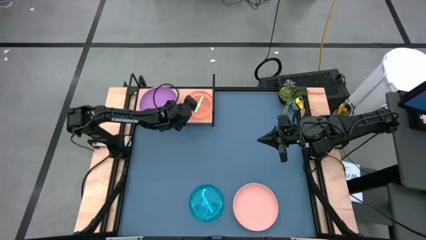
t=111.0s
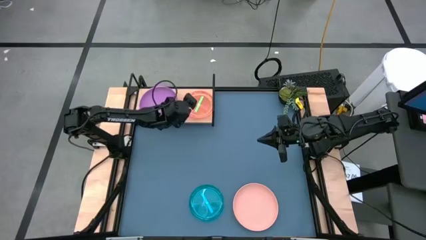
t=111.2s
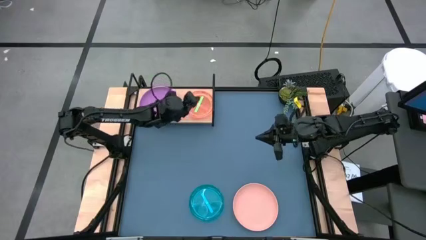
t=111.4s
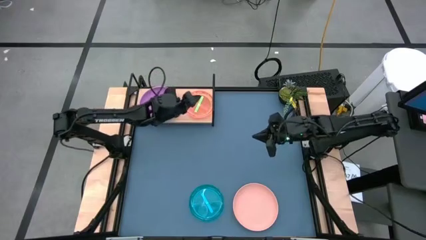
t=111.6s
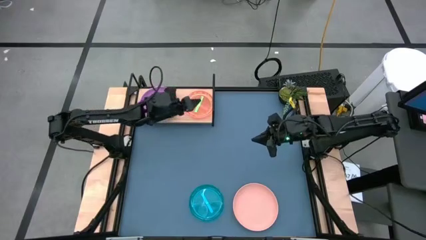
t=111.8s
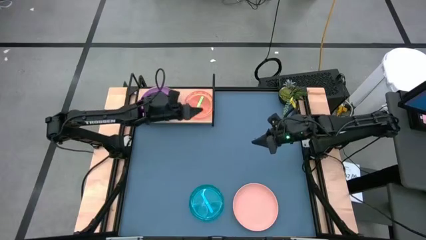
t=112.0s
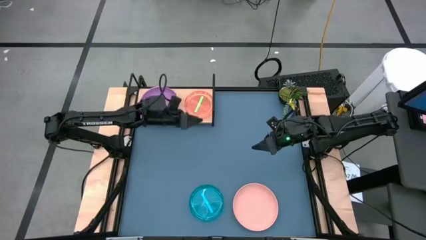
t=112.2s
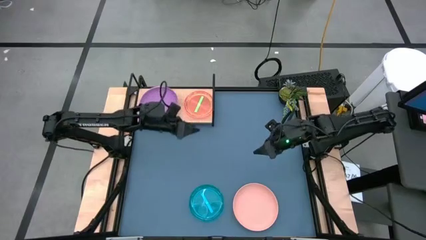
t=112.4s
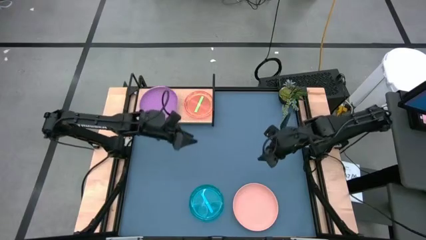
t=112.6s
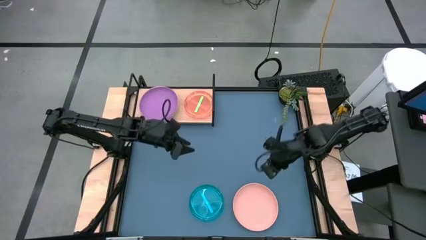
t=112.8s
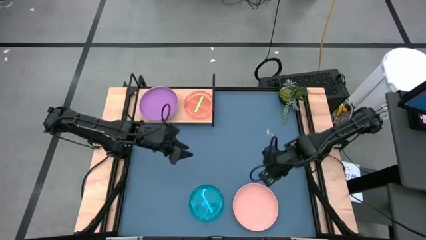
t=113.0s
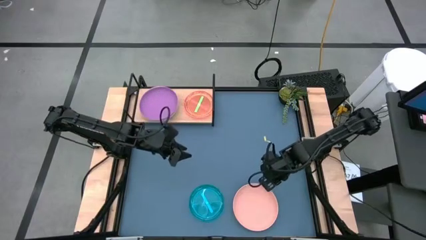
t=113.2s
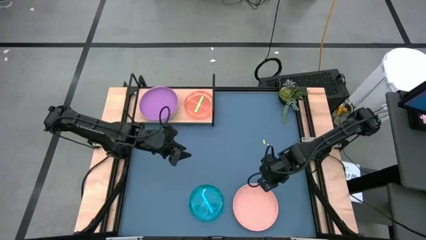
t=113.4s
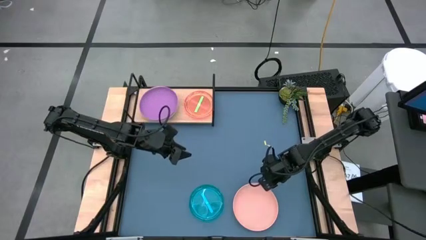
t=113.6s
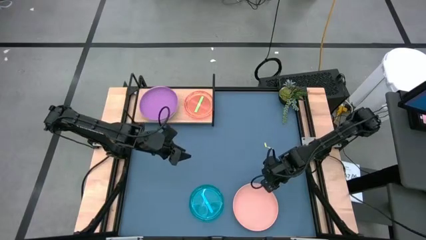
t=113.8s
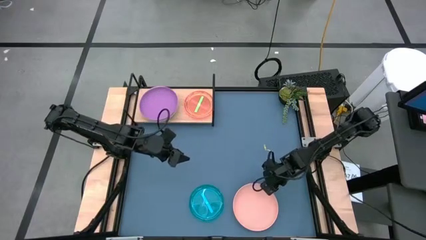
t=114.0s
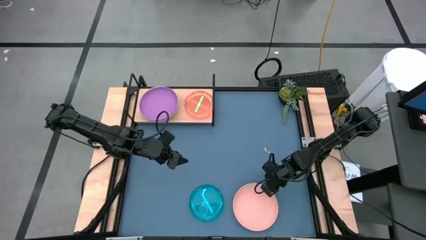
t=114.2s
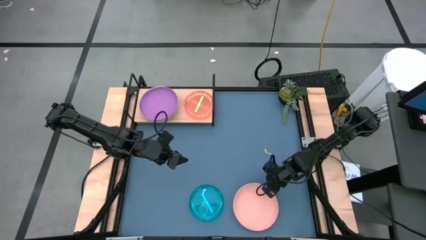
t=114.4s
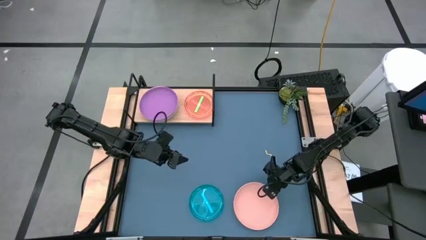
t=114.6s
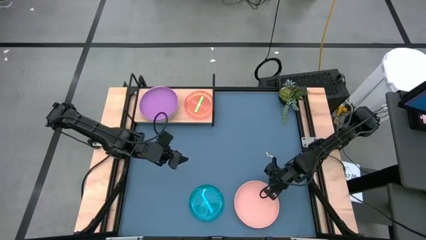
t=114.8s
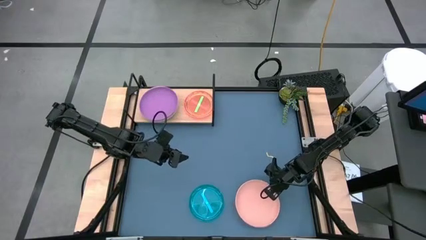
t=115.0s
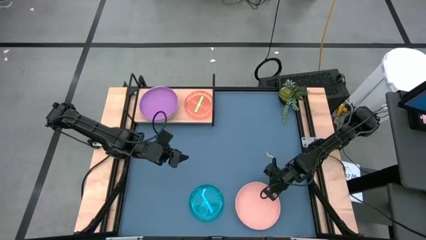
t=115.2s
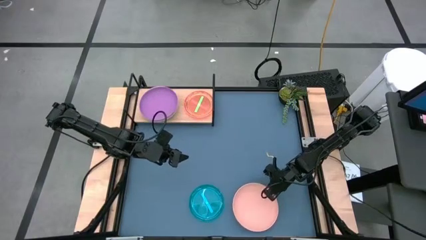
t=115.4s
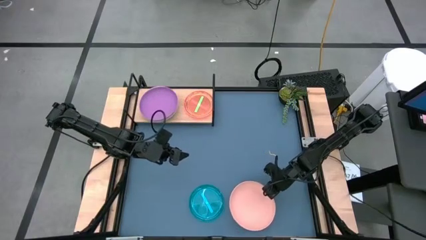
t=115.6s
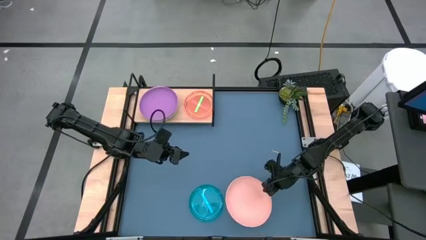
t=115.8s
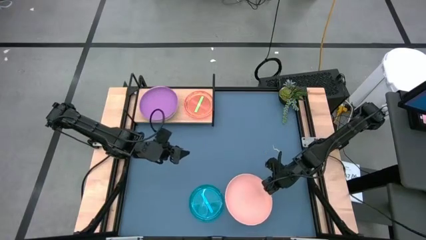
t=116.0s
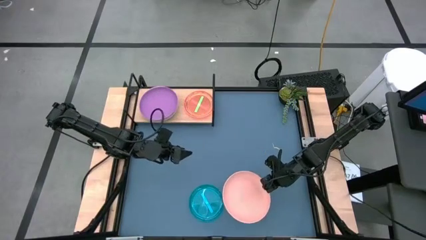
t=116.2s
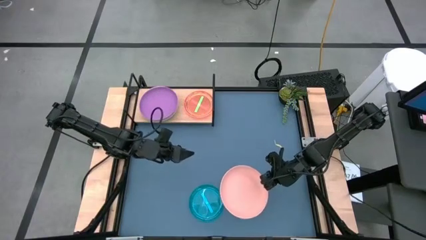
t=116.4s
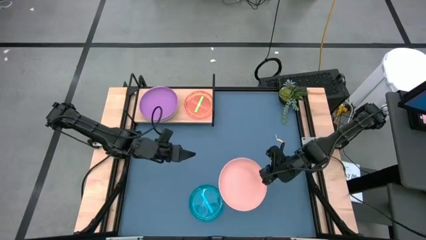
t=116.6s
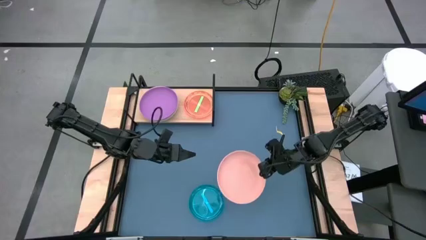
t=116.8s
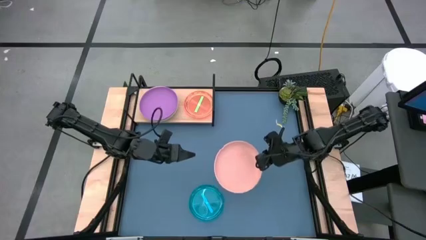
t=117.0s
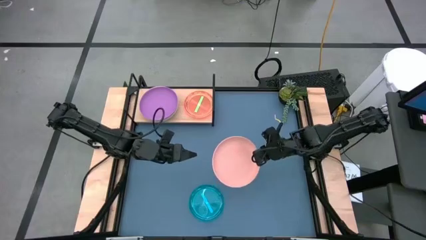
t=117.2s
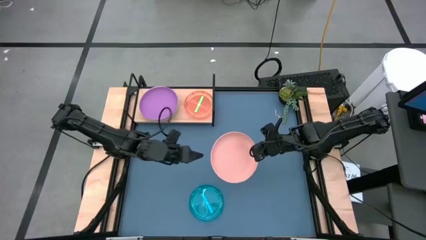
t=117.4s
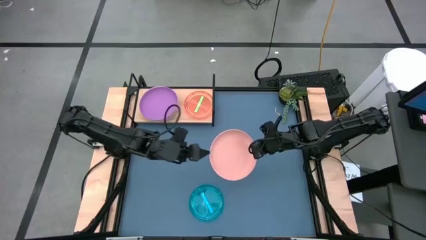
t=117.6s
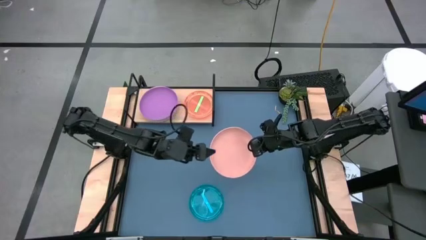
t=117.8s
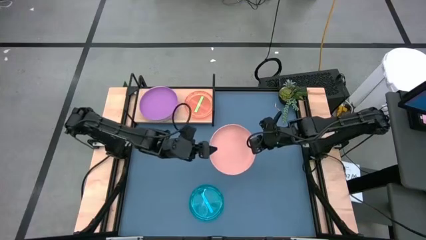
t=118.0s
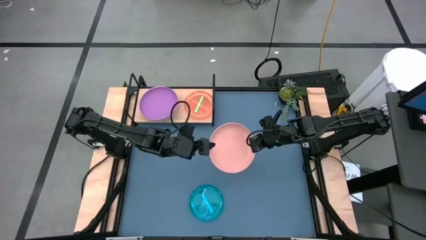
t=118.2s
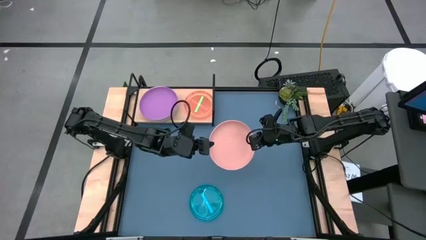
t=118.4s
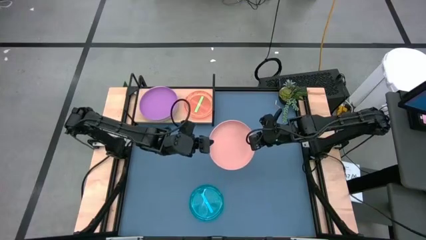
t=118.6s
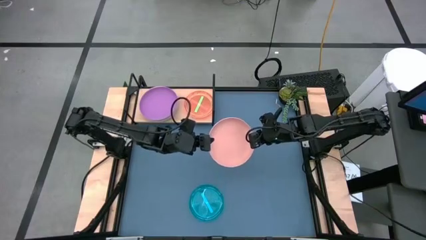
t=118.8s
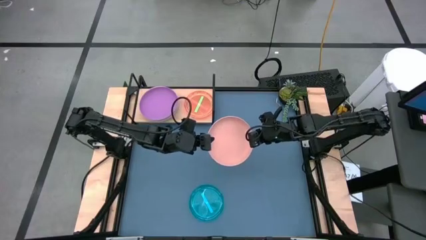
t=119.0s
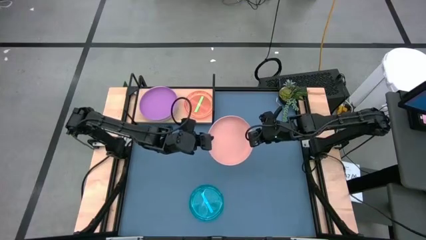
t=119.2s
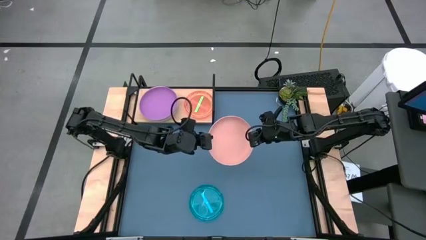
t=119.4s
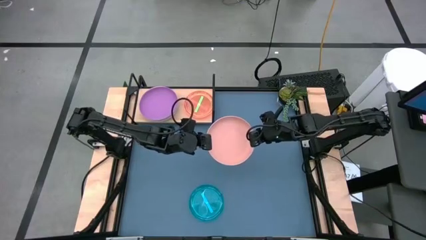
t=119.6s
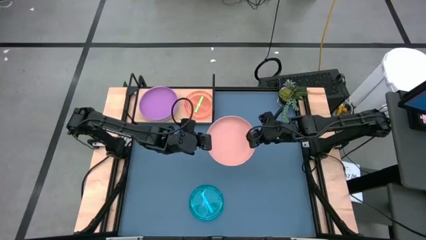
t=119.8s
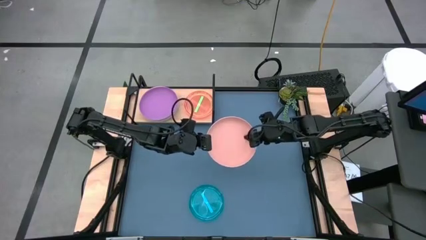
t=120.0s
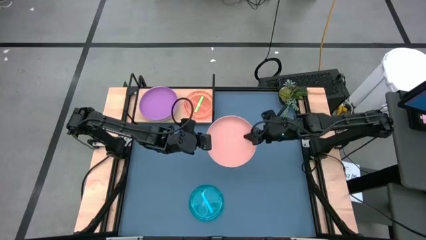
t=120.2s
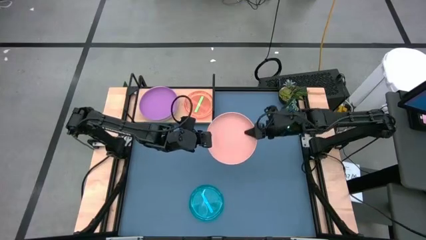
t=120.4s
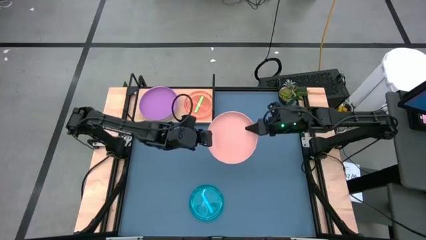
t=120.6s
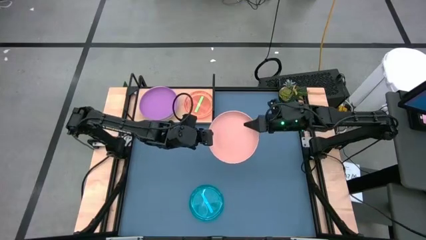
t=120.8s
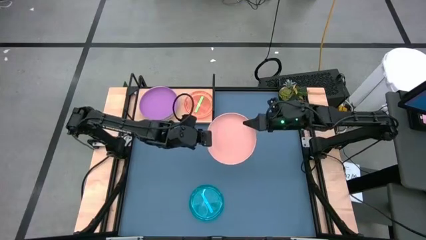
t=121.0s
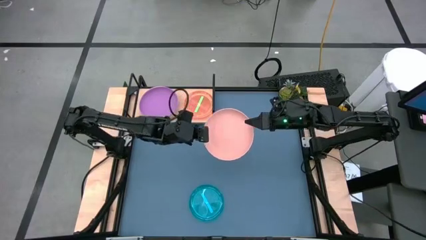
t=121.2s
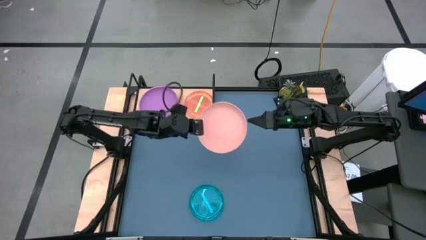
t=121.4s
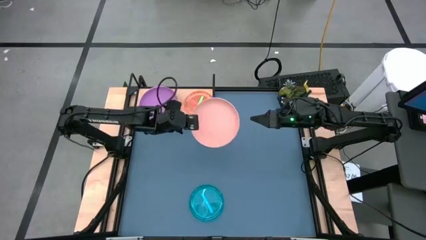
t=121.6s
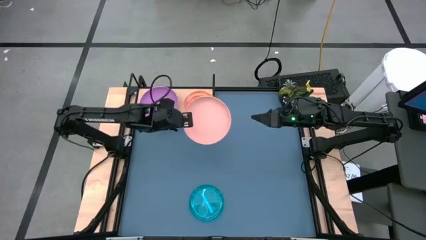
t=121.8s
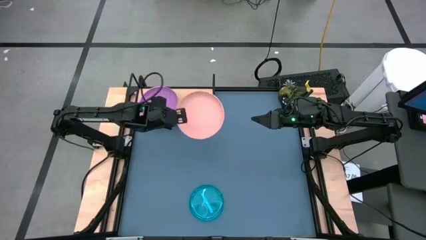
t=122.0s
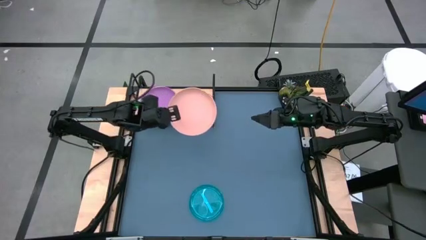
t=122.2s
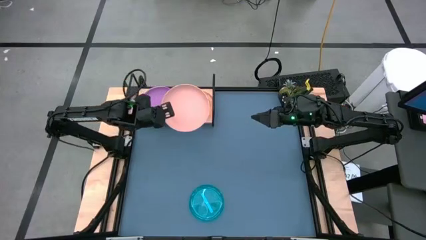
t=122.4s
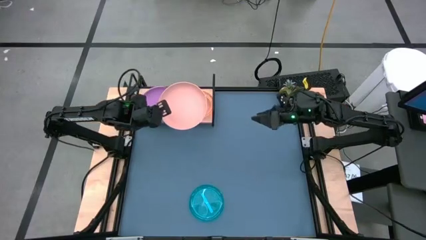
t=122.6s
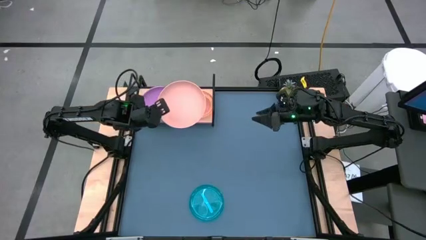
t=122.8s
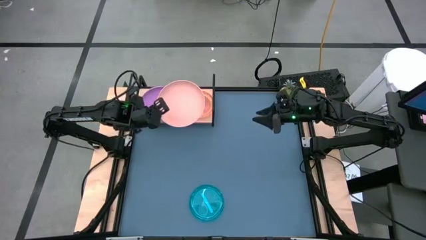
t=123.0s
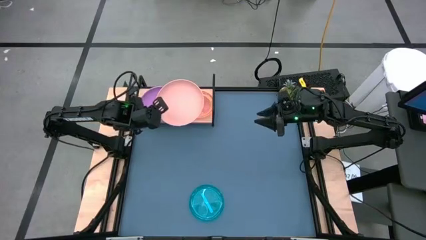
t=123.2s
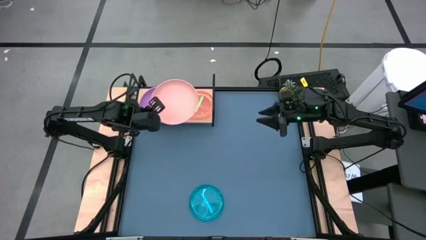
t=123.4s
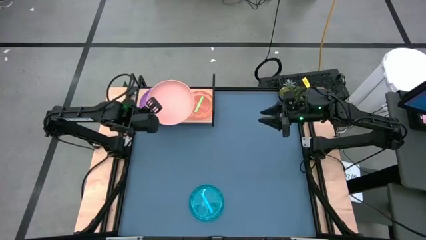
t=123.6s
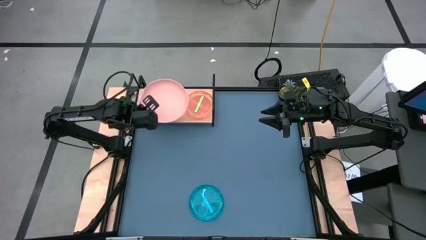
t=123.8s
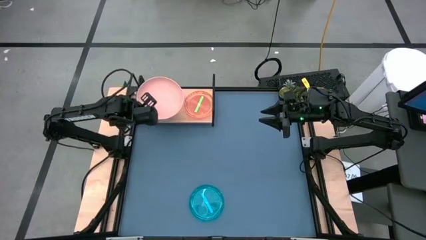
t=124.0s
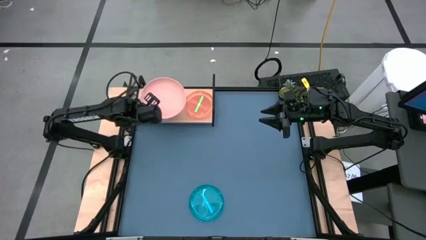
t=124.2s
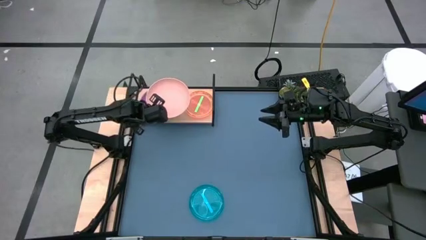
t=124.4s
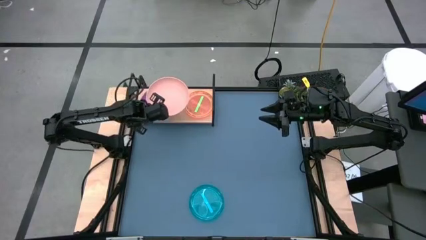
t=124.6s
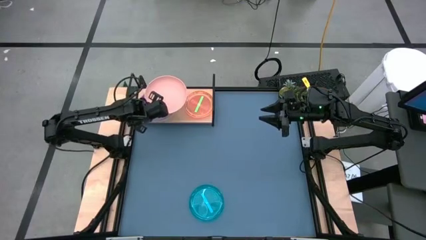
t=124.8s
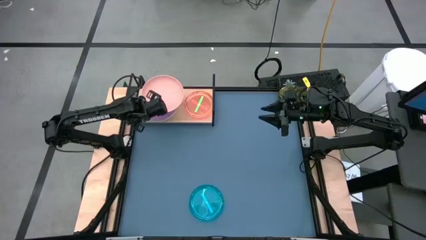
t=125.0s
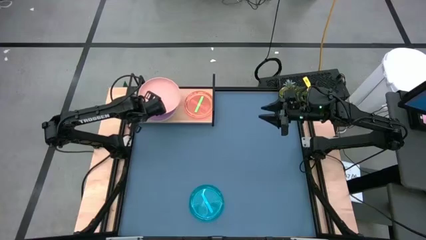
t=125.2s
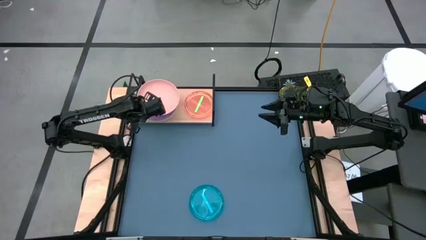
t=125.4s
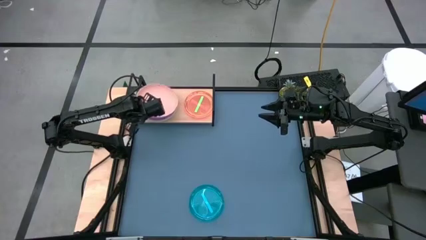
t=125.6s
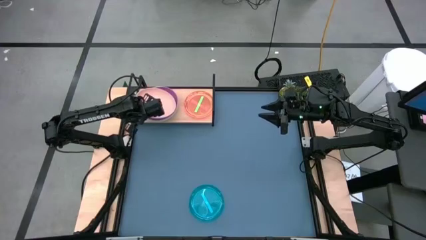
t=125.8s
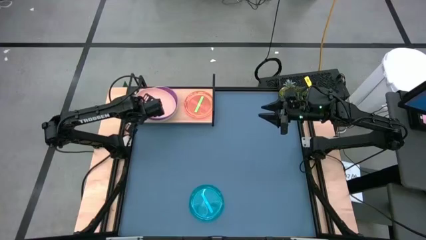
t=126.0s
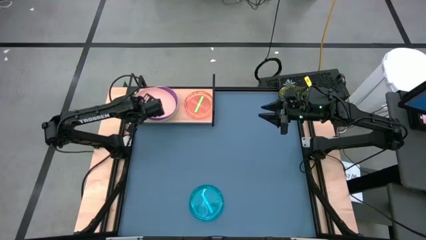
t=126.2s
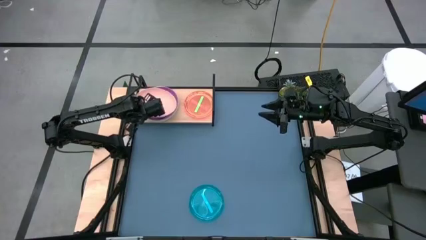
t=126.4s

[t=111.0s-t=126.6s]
Task: Place and stack plates onto a shelf
Stack the light orange plate on top of the violet plate on the shelf

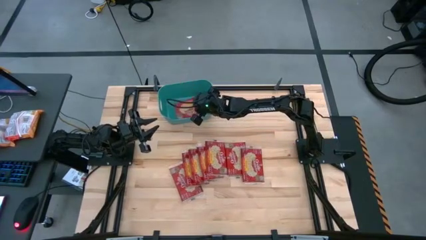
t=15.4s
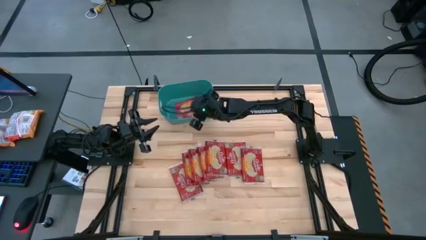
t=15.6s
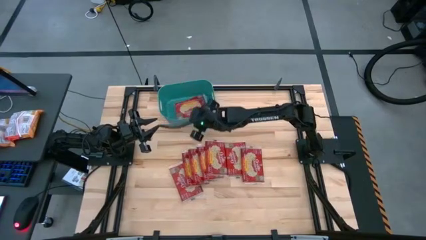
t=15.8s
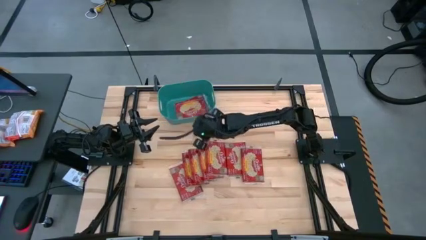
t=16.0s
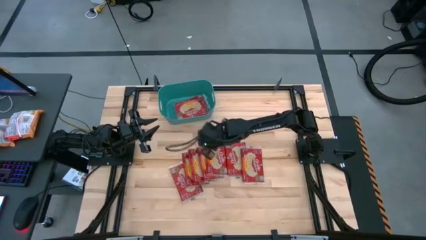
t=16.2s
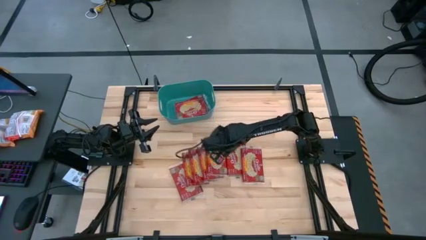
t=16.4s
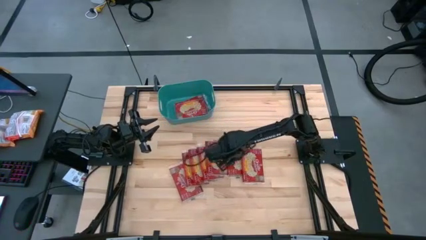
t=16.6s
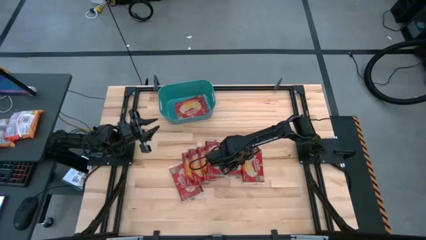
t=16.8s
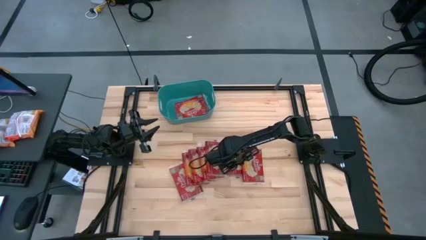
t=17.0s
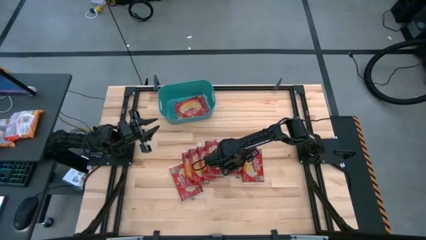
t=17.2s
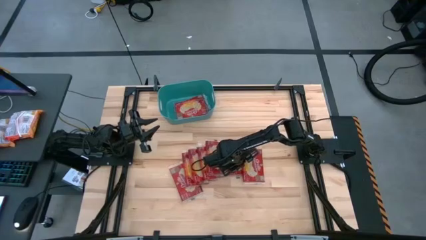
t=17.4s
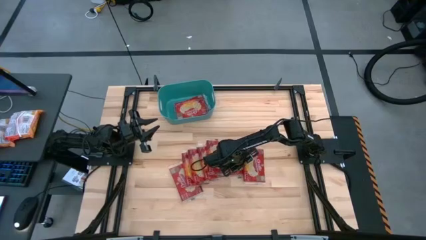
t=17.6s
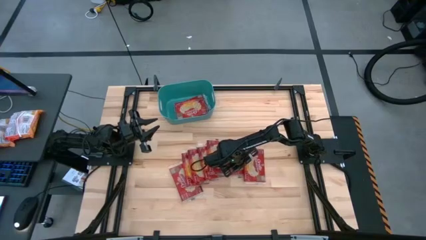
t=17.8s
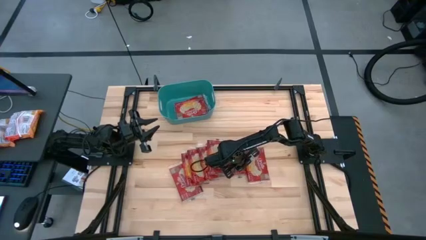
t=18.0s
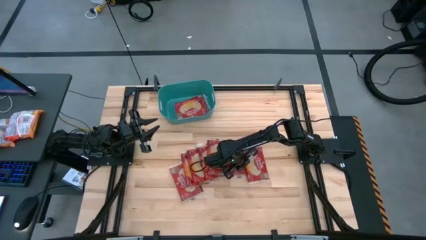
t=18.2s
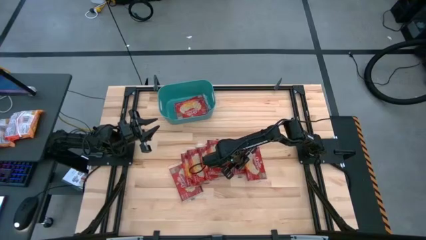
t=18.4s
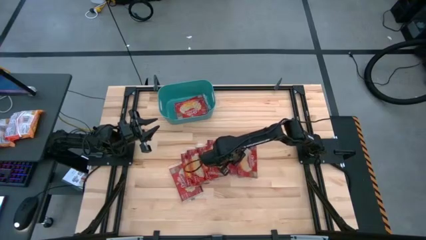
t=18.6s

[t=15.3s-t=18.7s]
Task: Sort popcorn bags into baskets
Put the red popcorn bag into the blue container
